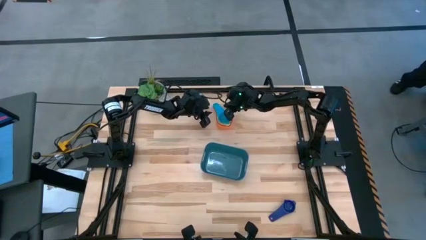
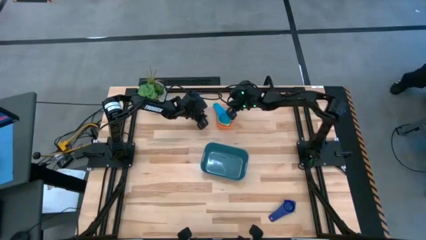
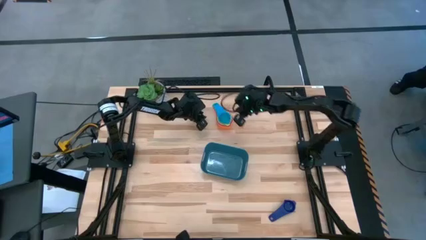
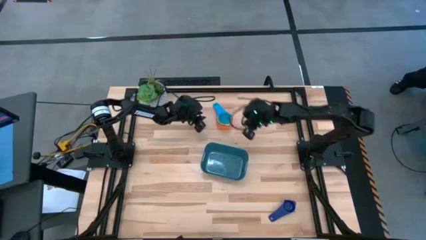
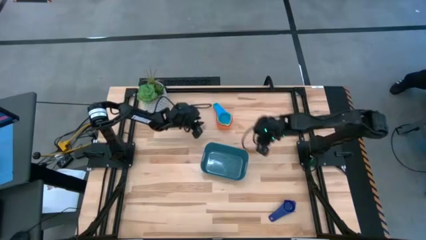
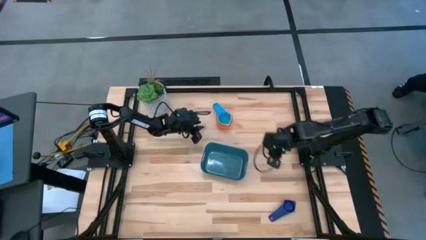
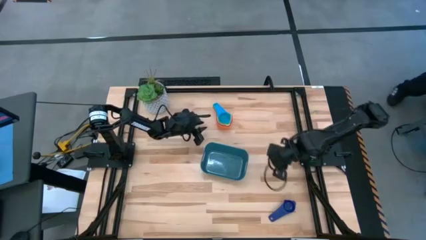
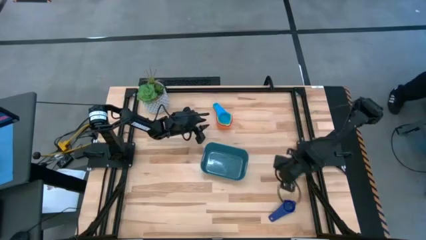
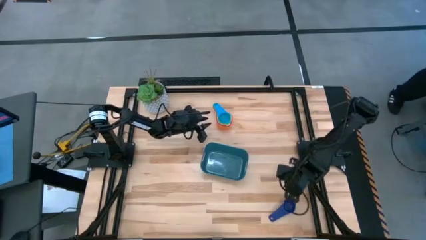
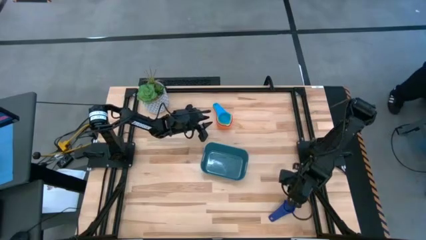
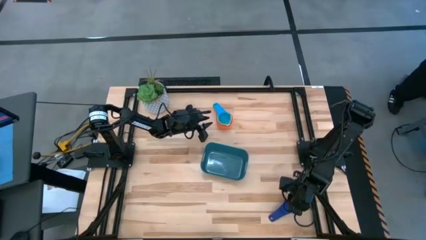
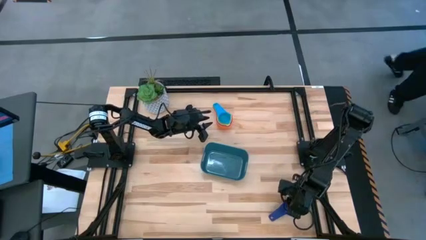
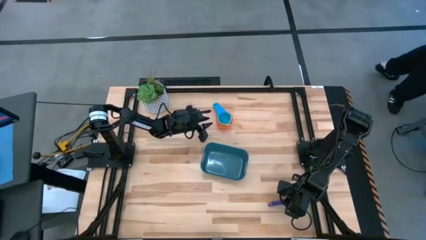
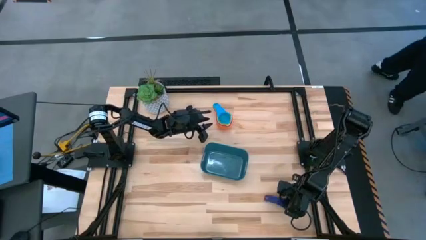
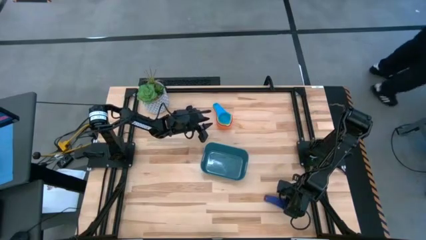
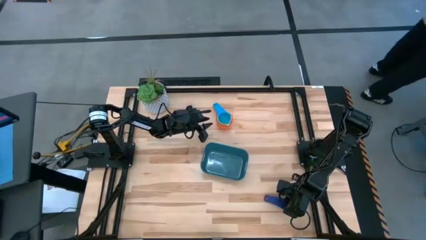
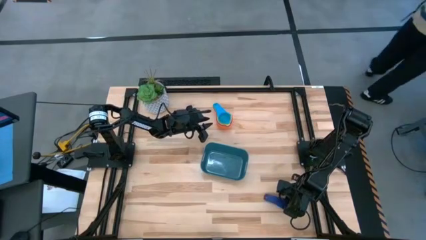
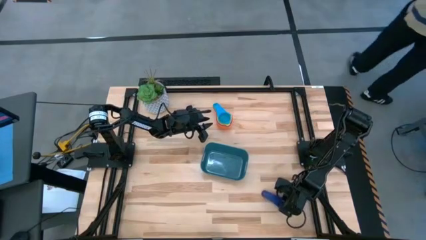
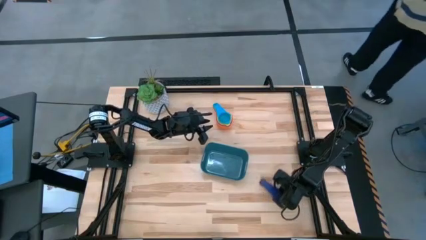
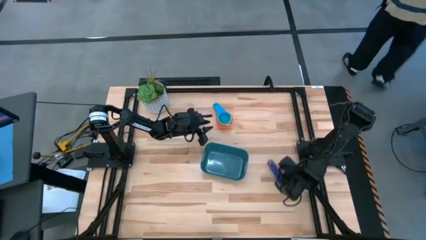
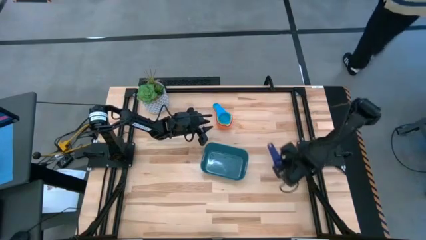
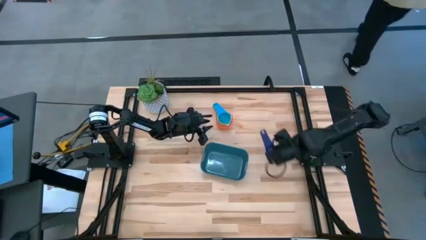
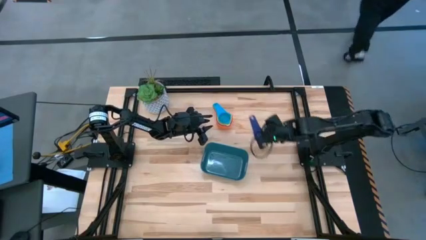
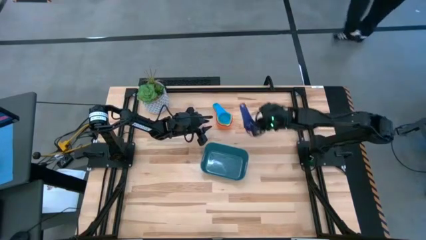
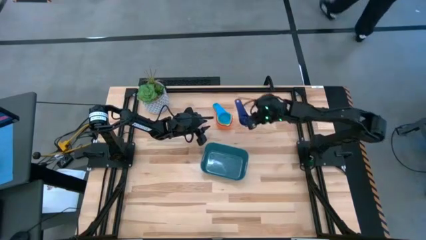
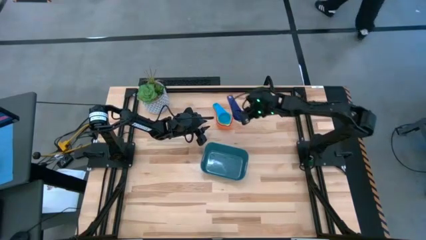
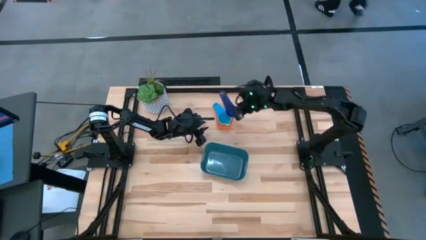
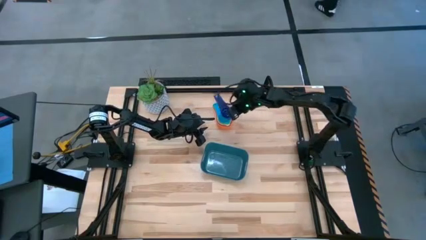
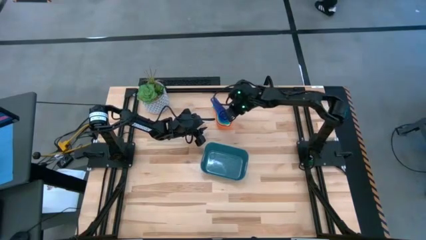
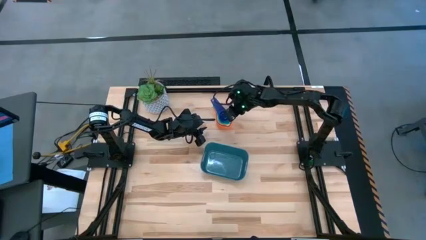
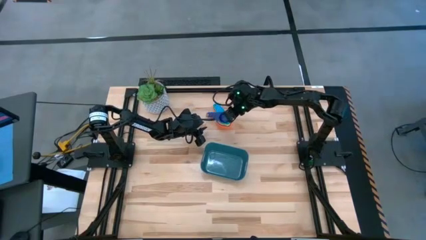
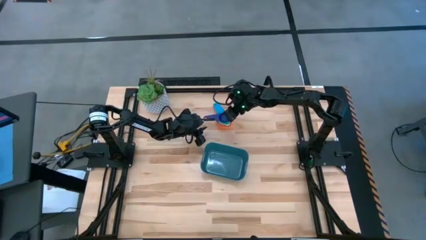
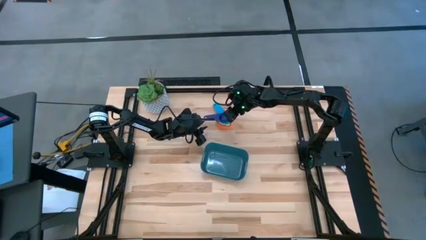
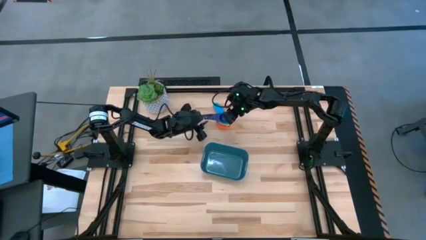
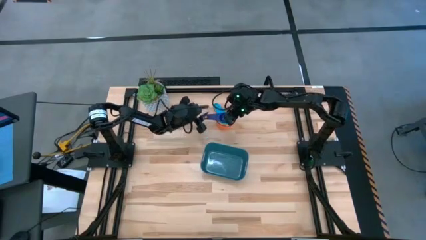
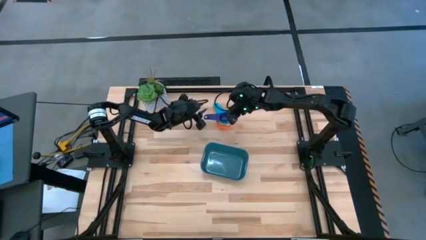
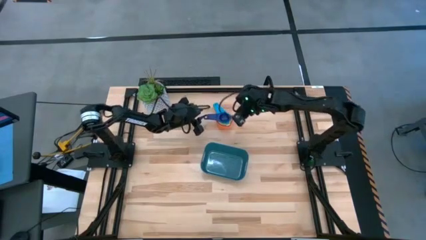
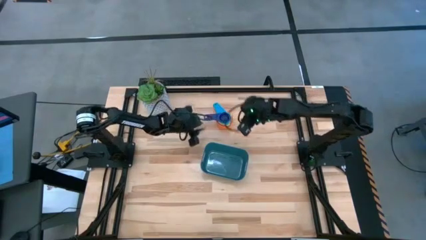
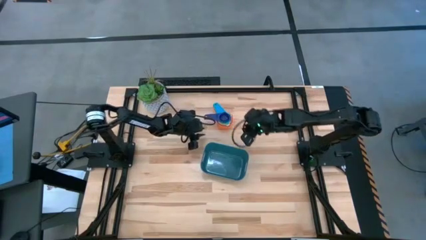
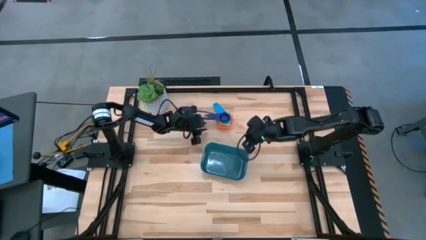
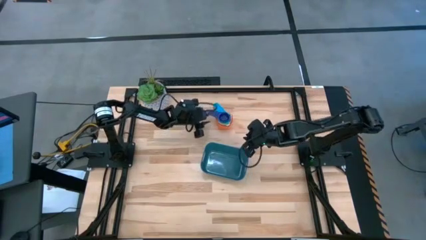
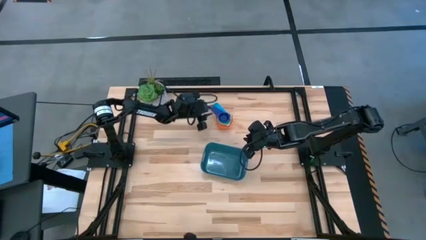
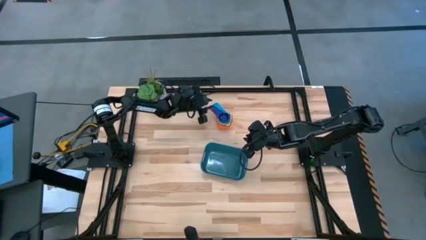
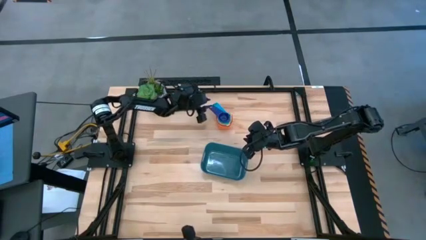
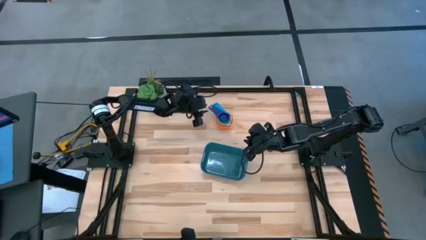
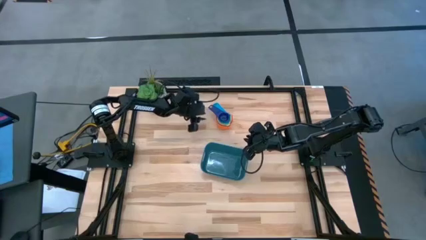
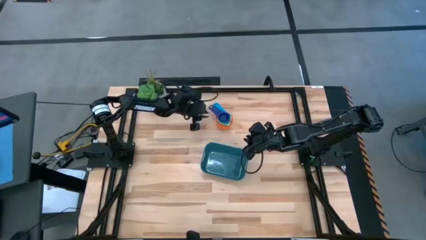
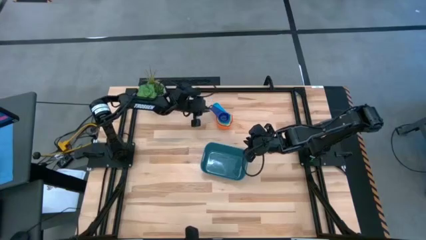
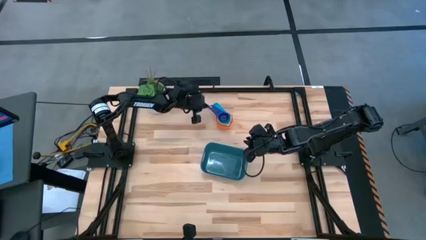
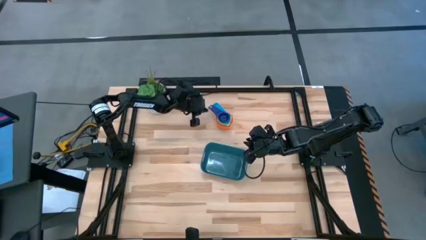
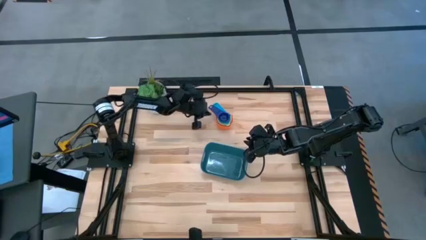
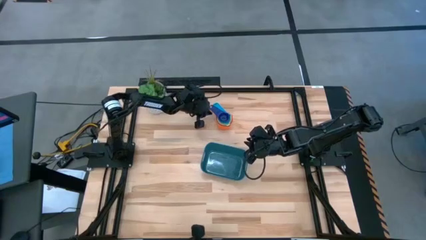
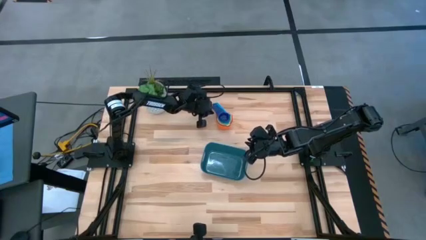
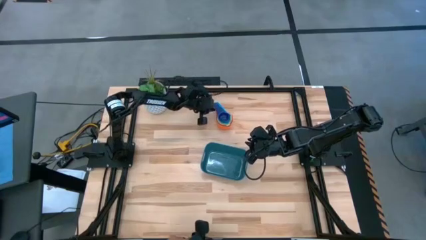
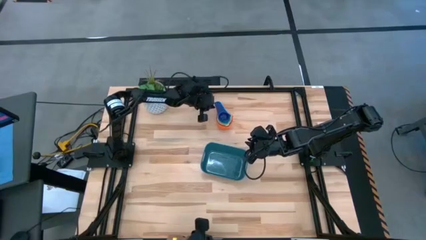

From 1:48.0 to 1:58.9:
Task: Nest measuring cups in basket
Stack the violet measuring cup on top of the light blue measuring cup

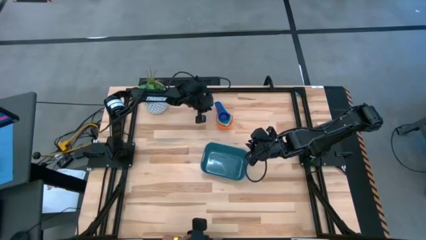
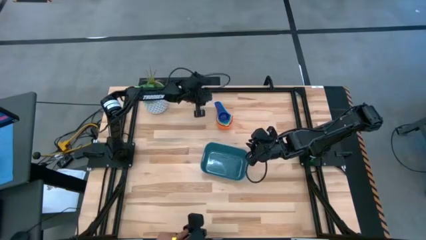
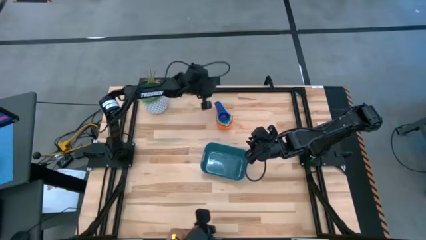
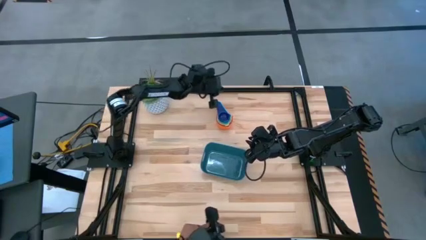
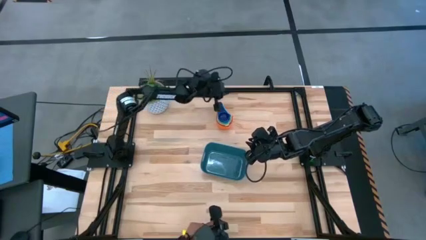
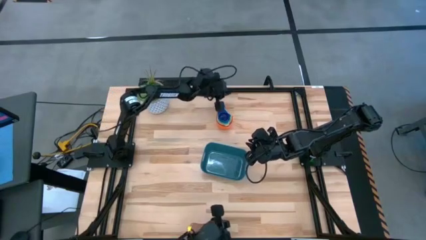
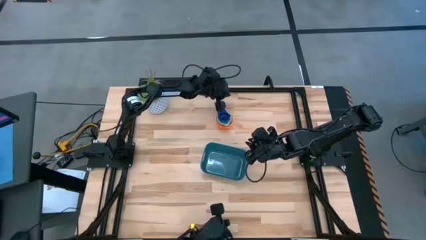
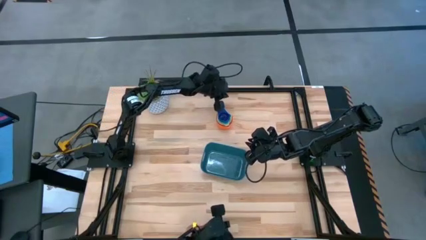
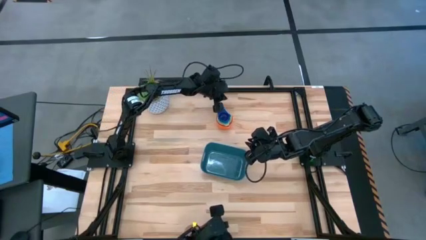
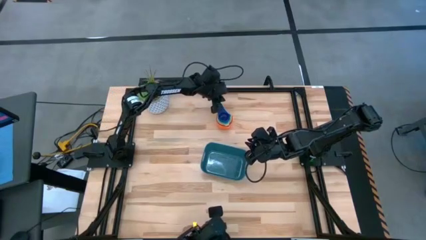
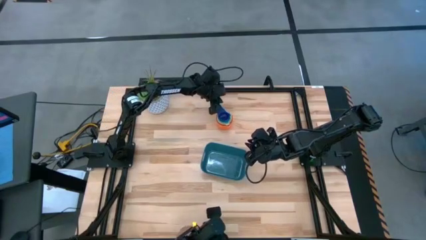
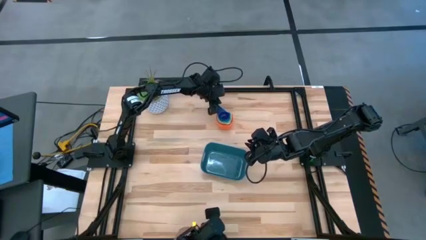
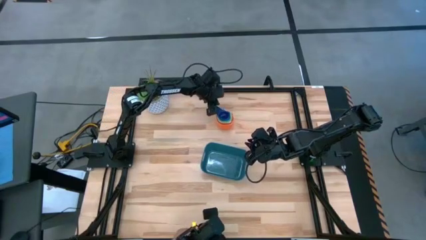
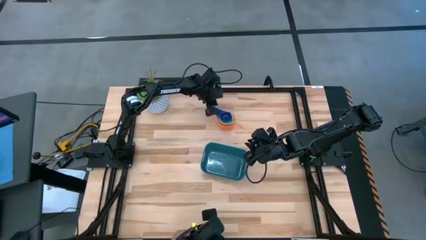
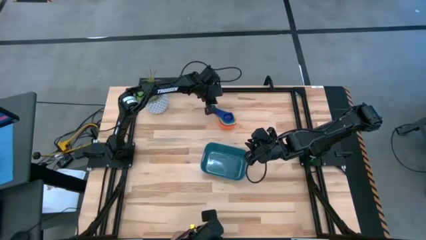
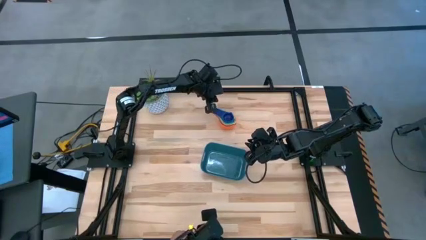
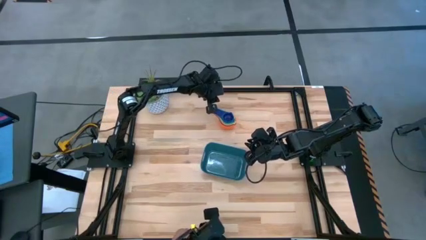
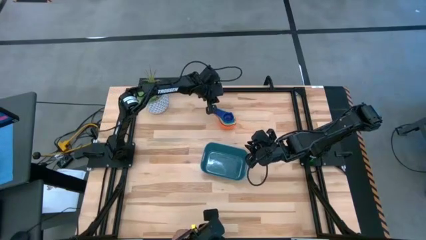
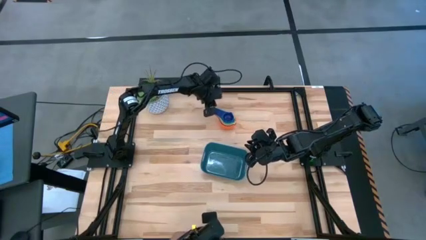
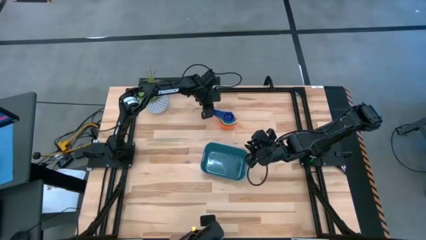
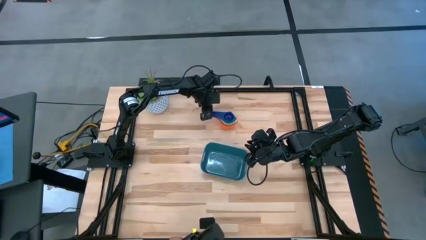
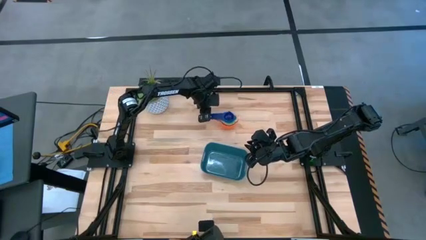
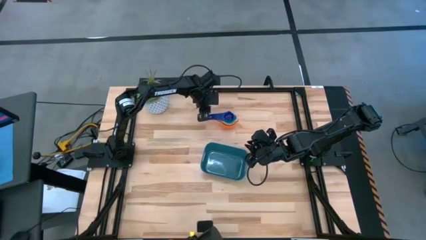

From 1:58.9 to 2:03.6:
Adjust the measuring cups

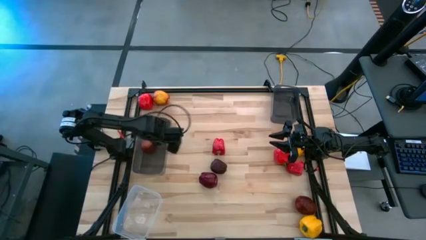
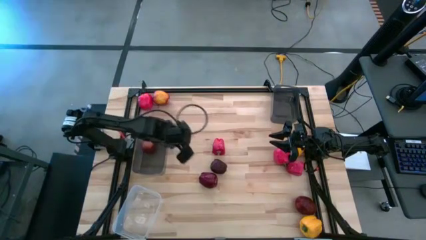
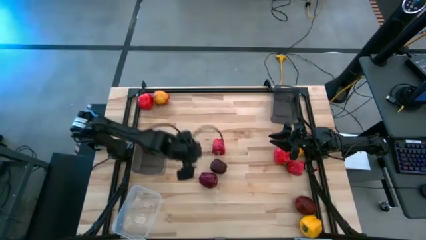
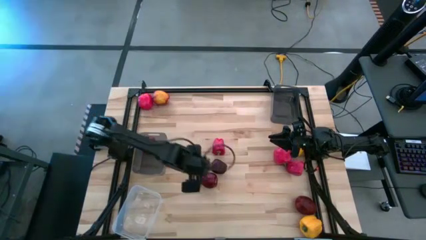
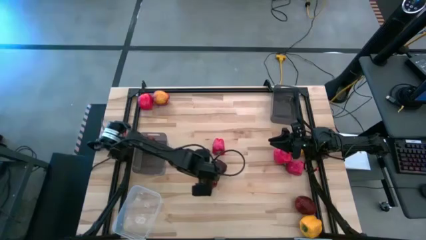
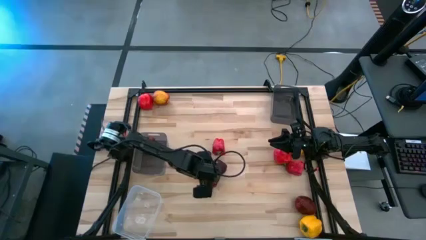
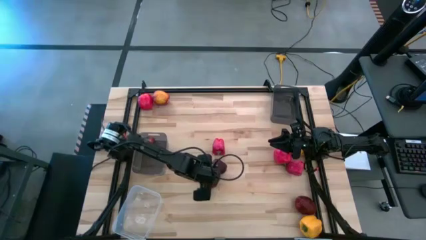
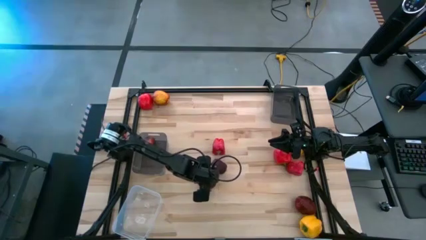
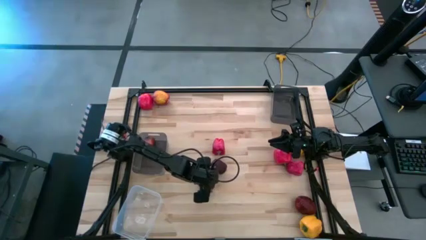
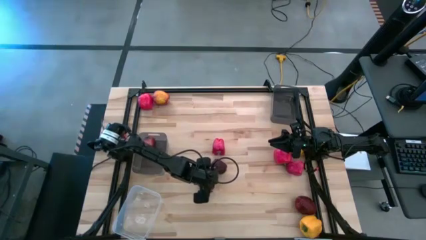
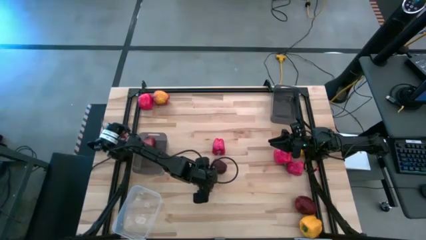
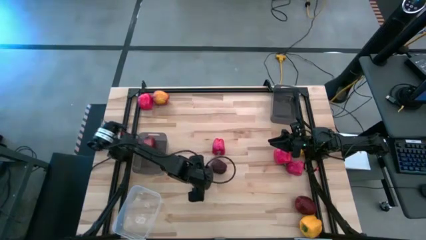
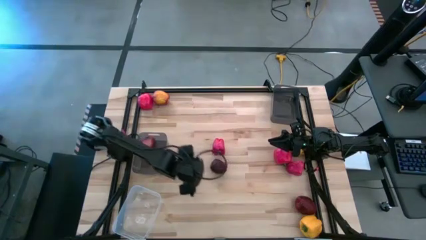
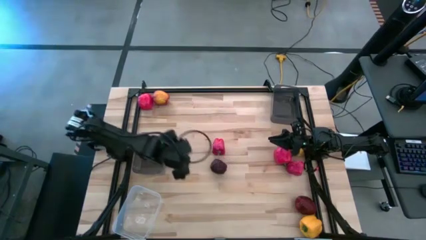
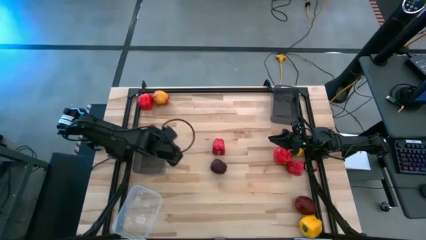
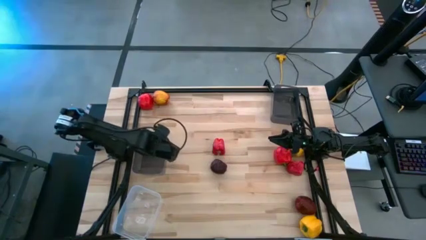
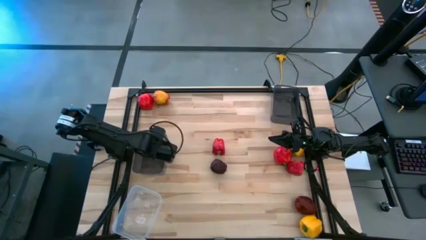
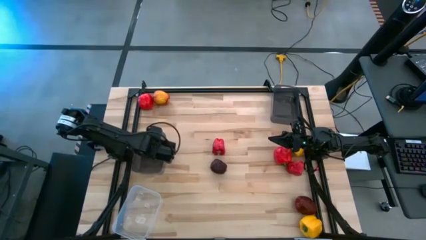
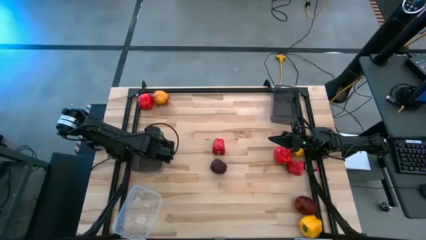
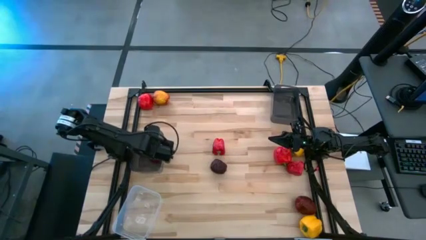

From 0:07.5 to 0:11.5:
Task: Sort produce into baskets
Put the red apple into the left black transparent bin
